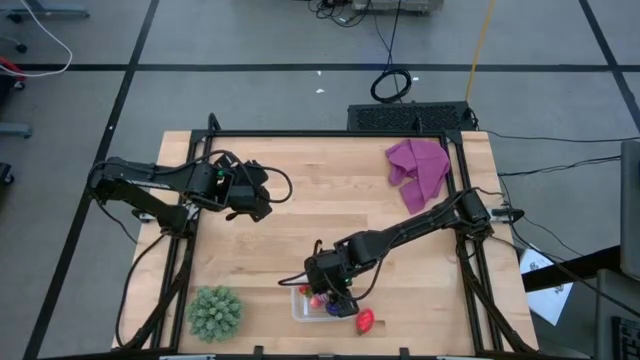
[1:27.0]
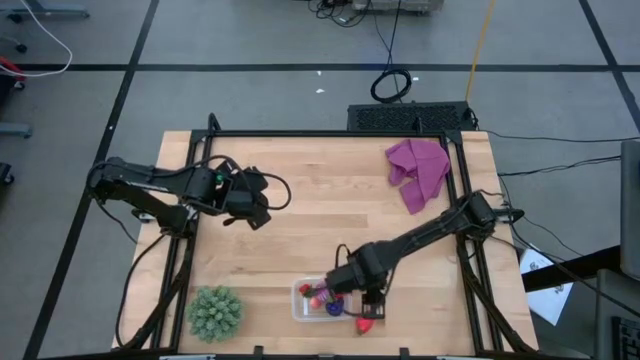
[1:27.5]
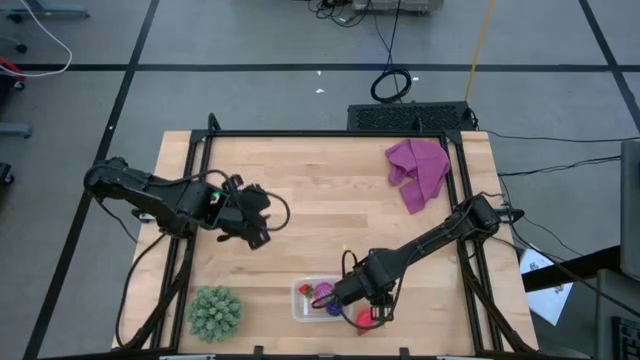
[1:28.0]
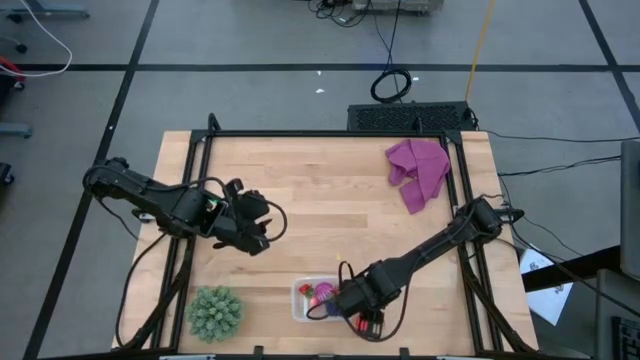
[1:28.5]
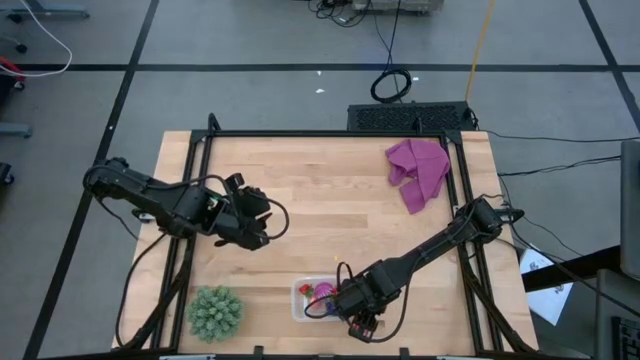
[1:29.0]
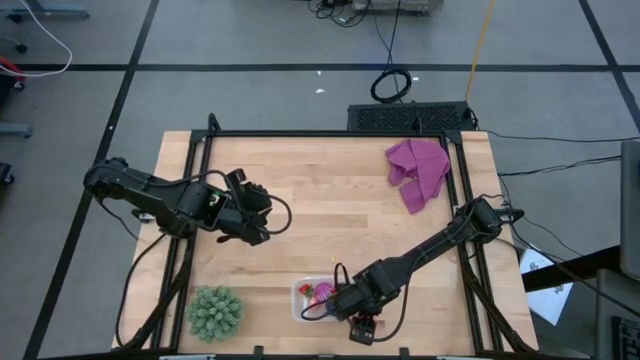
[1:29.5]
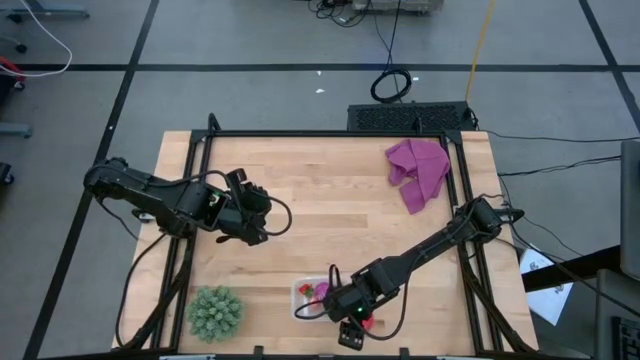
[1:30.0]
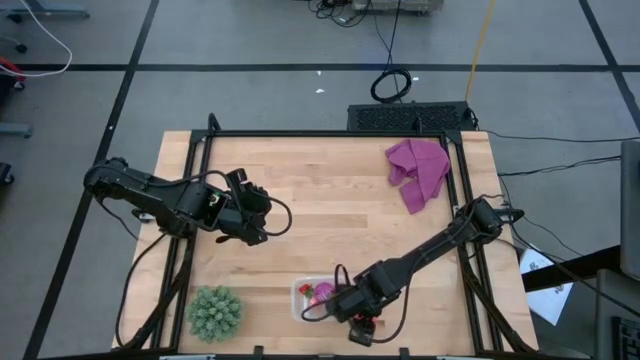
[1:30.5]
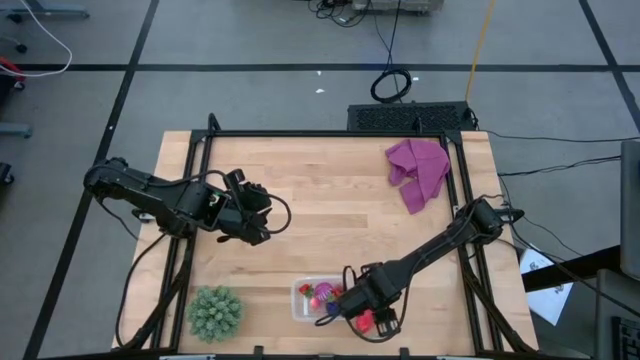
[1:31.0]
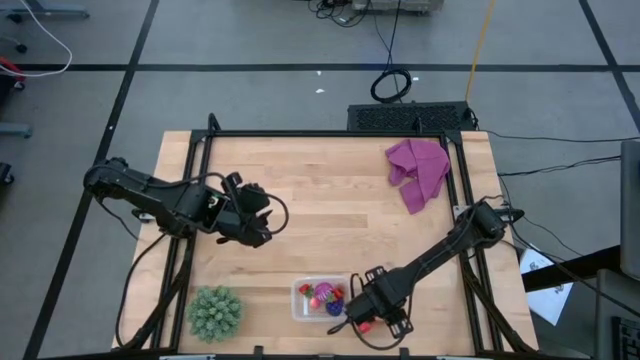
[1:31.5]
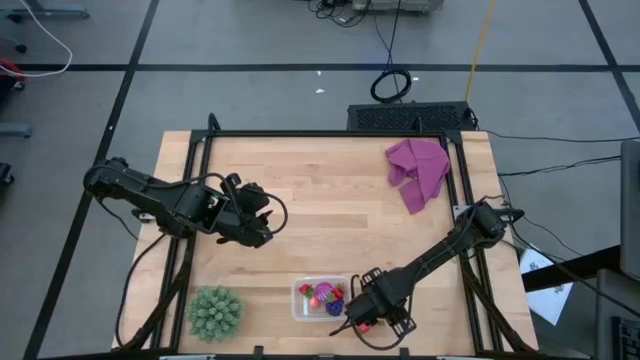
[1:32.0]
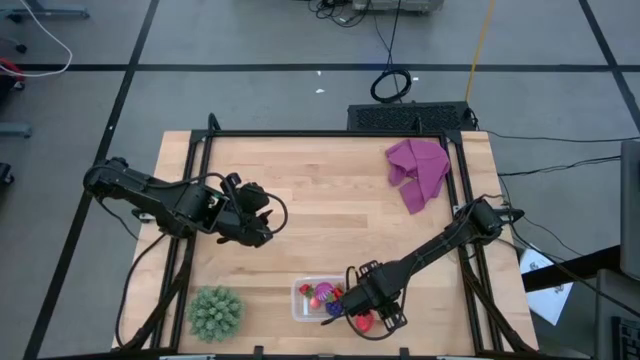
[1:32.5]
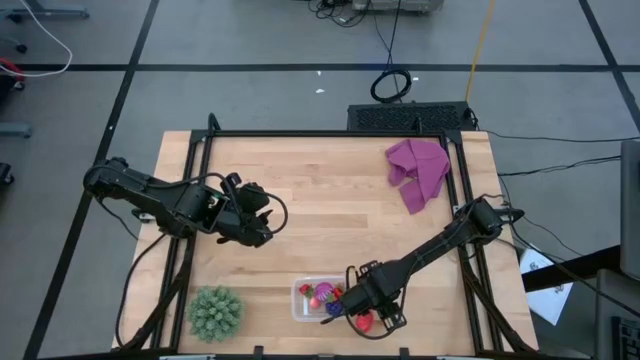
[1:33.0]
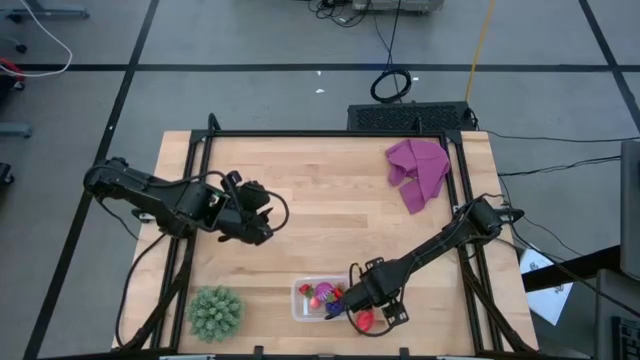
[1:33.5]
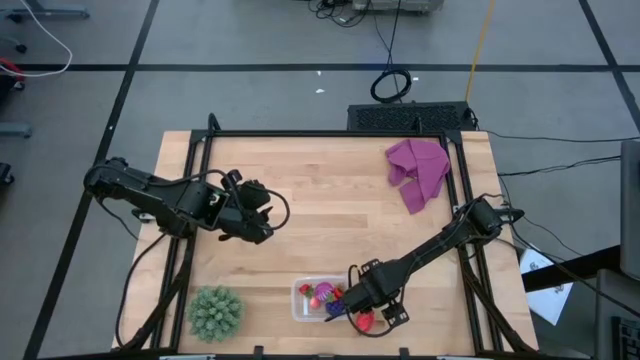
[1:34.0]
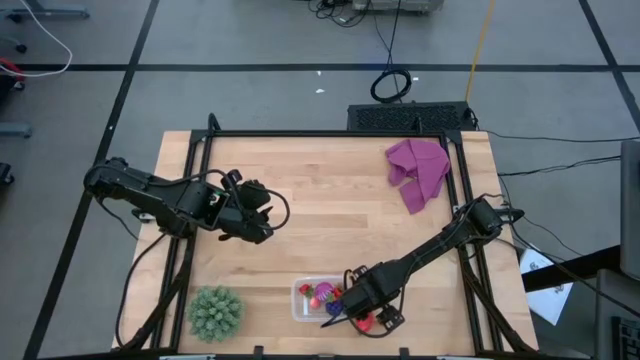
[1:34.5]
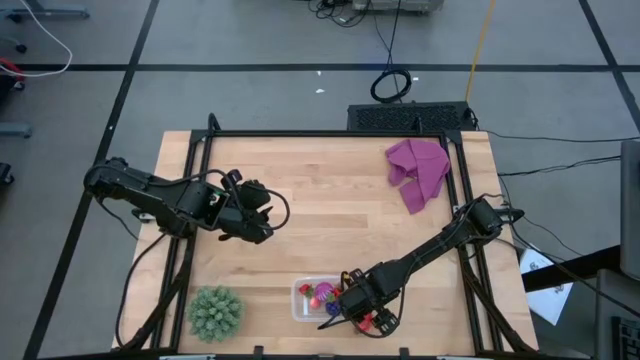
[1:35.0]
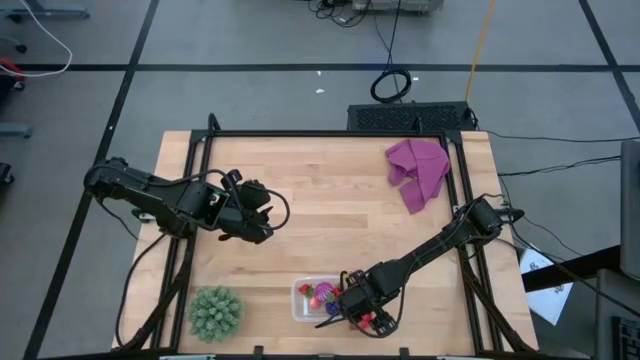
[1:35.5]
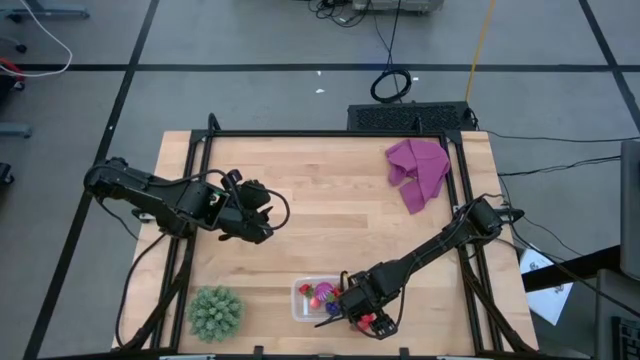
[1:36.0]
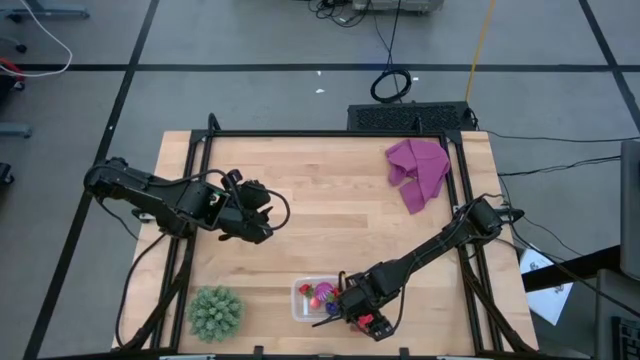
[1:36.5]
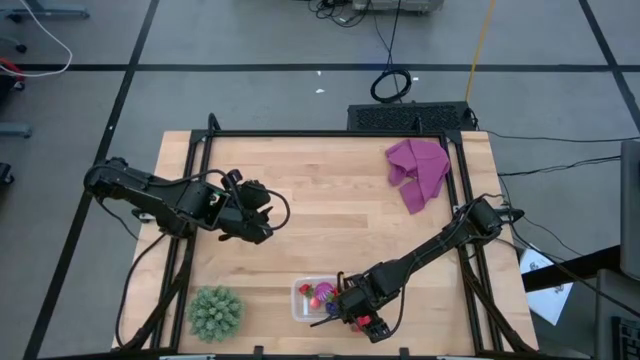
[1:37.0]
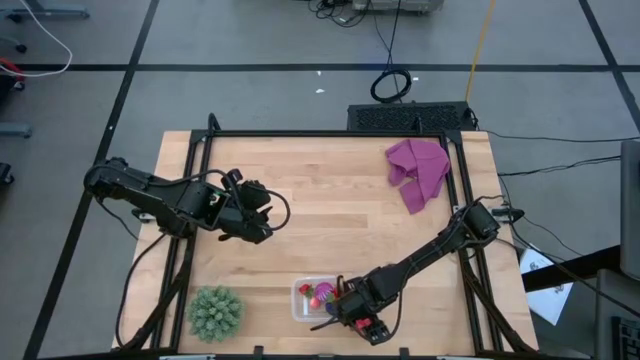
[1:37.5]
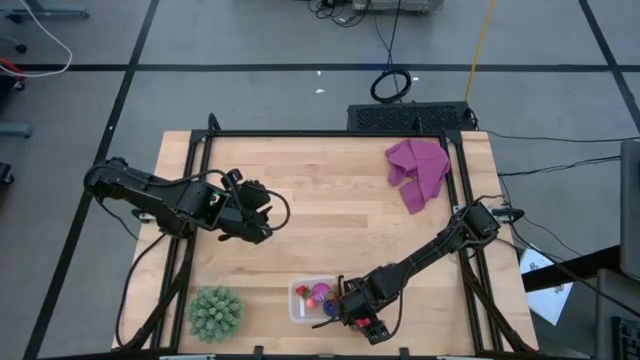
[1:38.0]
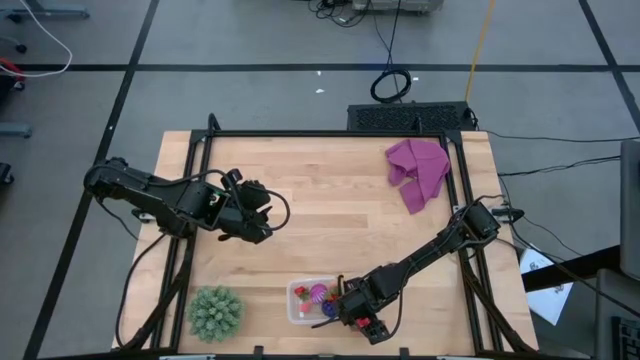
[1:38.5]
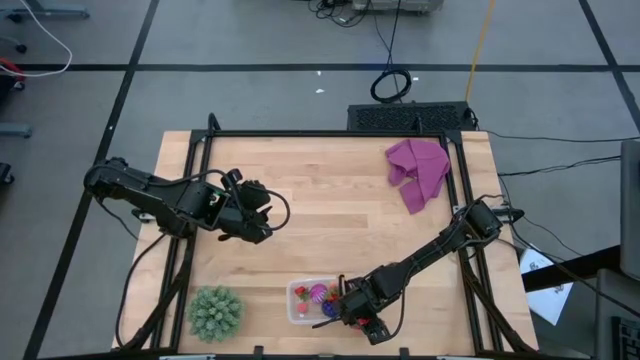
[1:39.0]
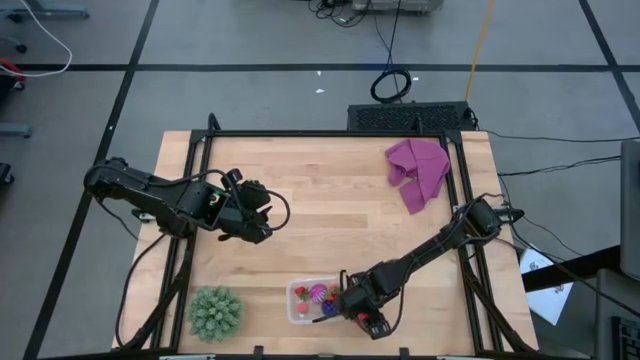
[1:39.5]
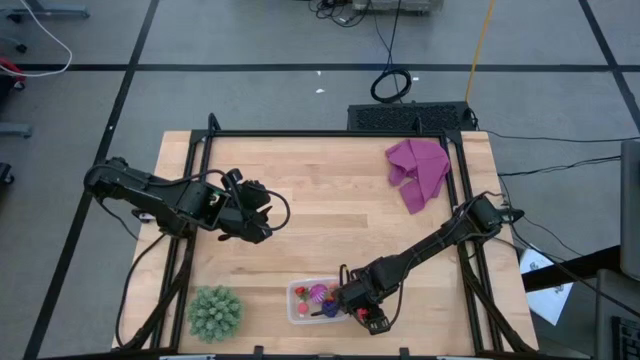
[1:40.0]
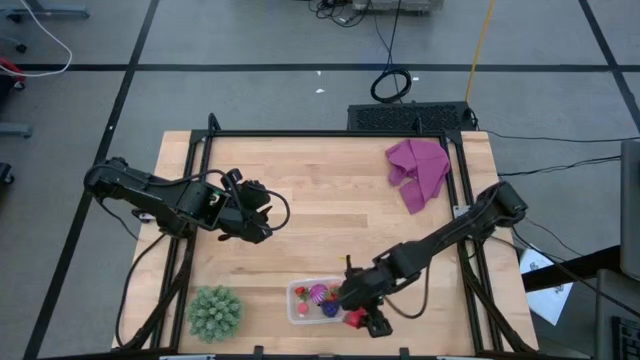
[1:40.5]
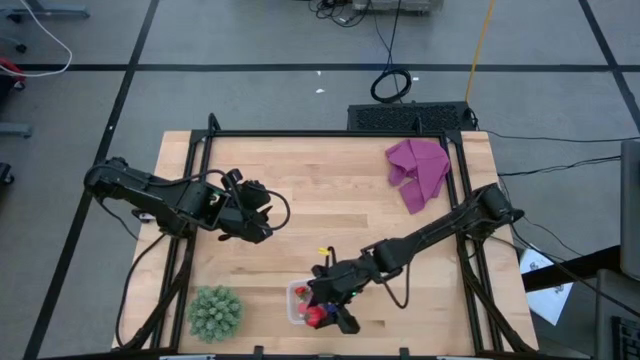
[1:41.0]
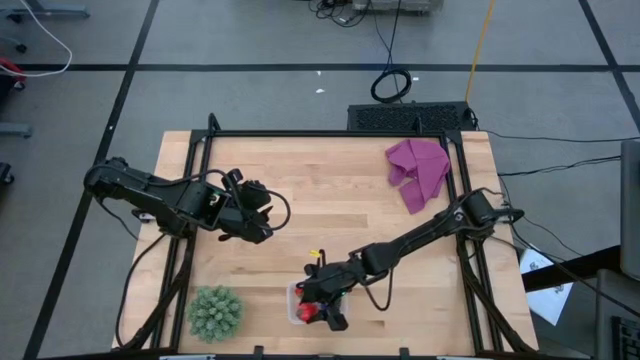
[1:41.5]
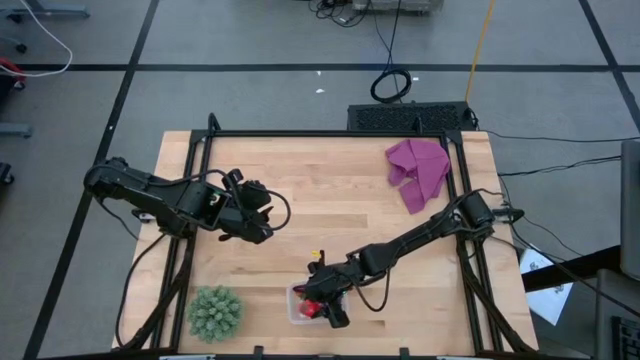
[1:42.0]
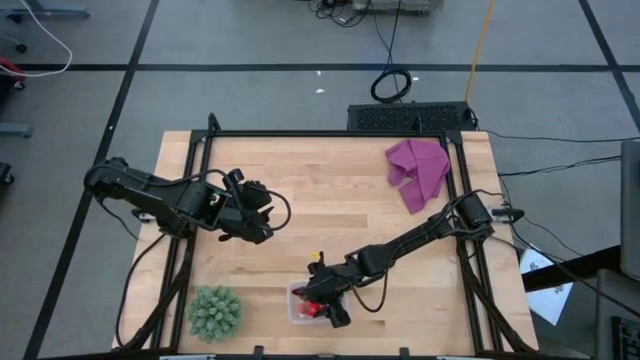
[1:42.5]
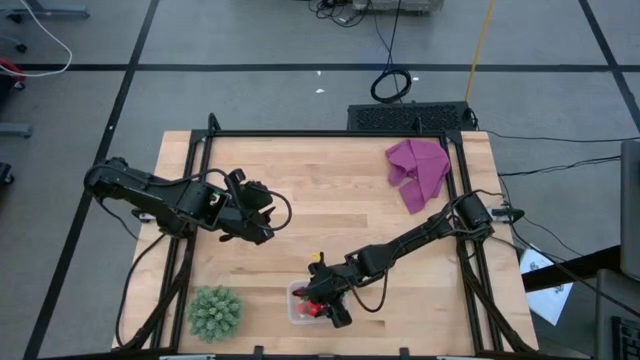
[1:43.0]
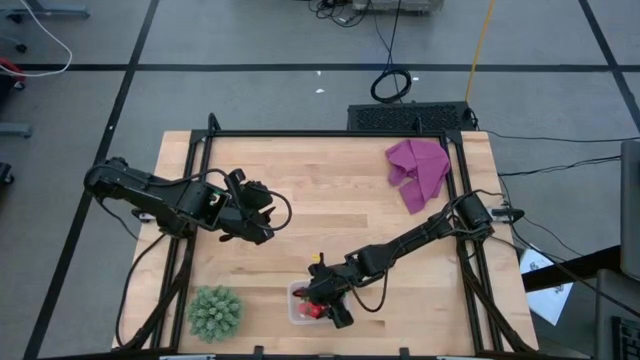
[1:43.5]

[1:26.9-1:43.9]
Task: Pick and placing Produce into tupperware
Put the dragon fruit into the transparent bin

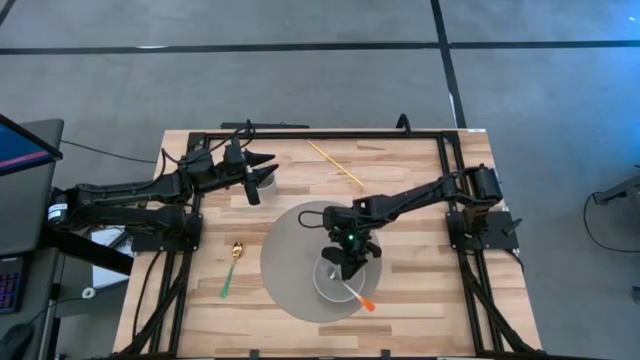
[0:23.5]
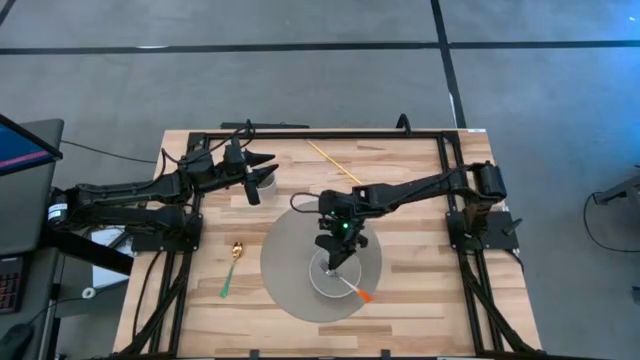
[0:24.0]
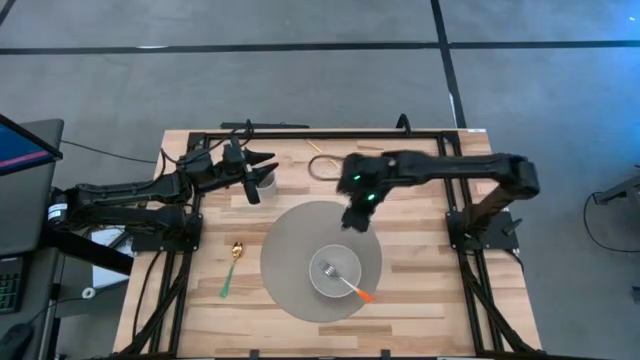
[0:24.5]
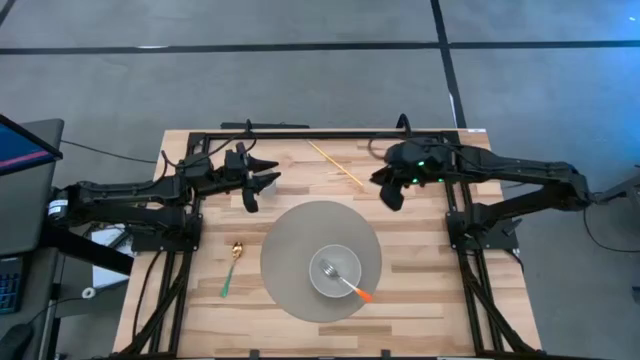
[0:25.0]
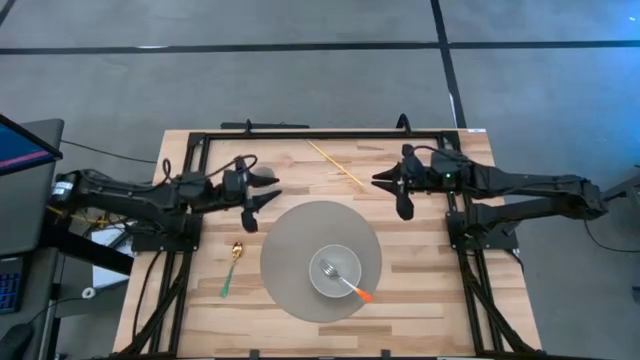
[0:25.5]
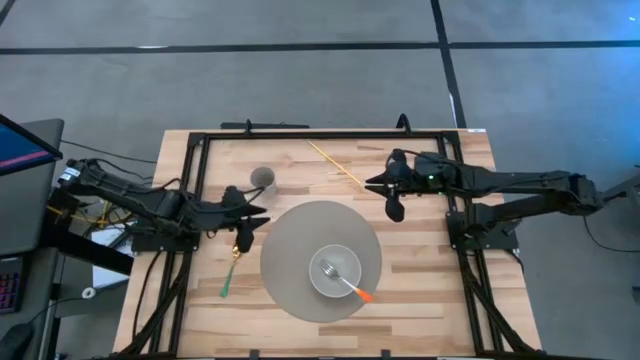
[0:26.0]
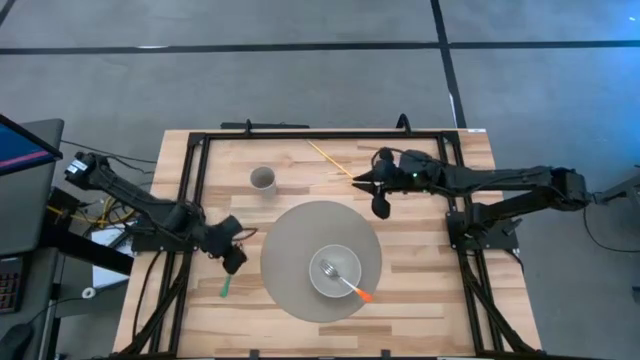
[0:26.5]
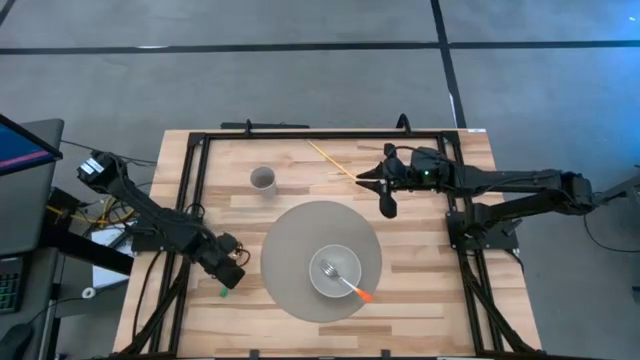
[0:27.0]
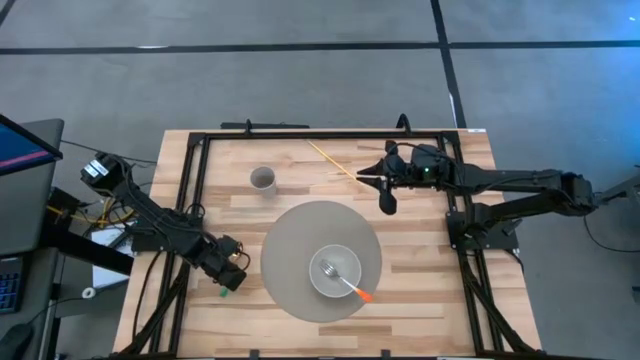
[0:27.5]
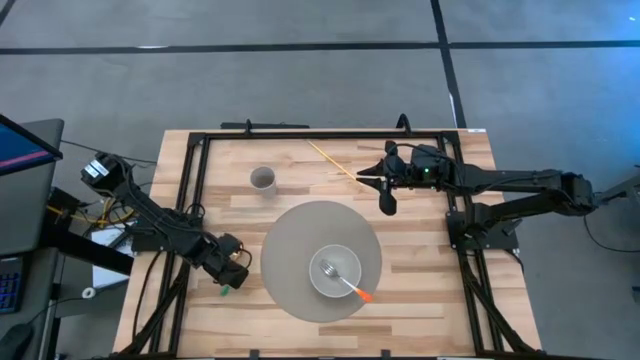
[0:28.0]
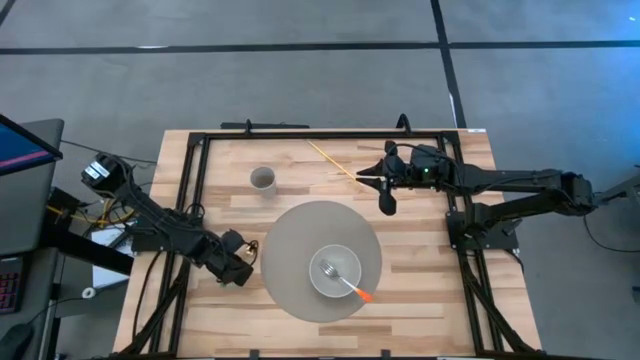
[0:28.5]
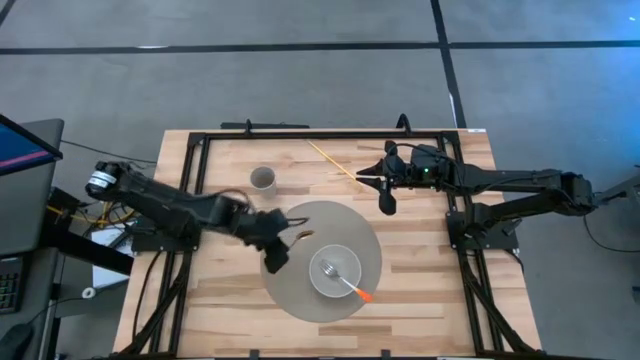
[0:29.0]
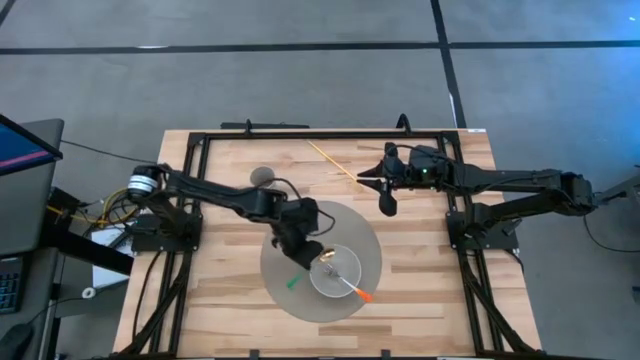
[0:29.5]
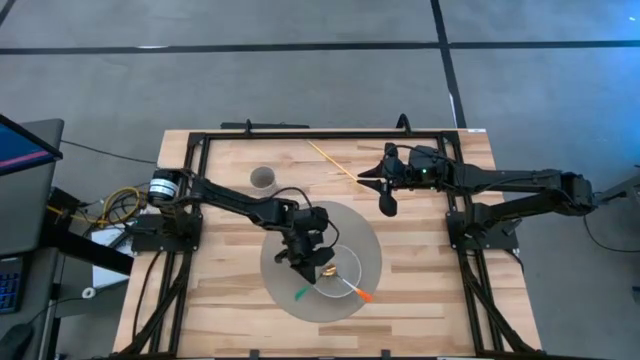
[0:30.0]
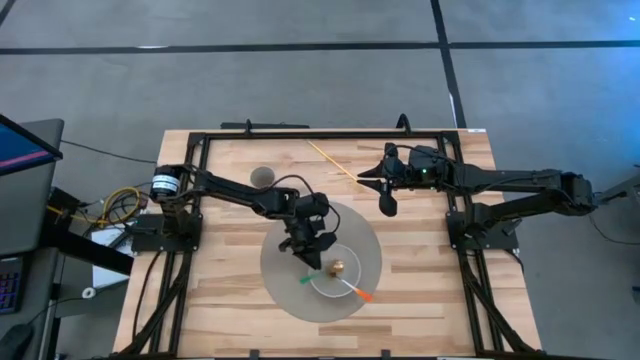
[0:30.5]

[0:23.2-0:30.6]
Task: Pick & Place Utensil
Put the green spoon into the gray bowl
